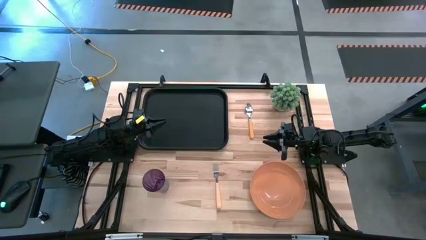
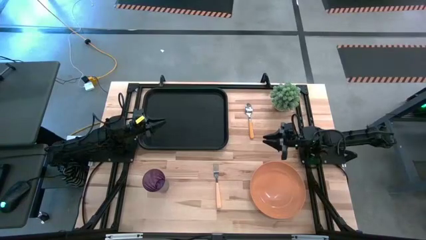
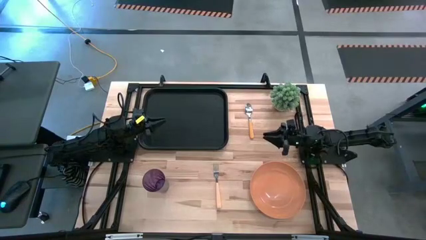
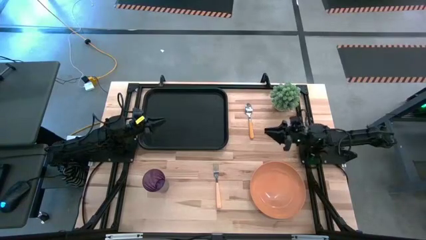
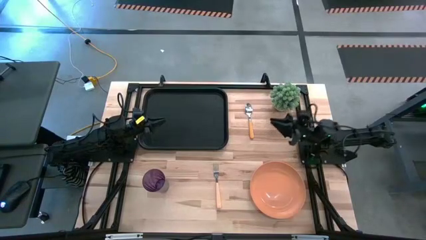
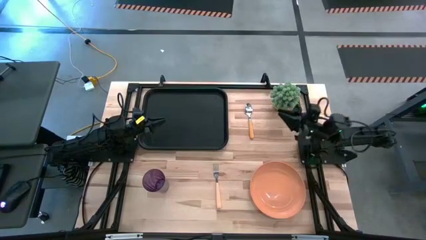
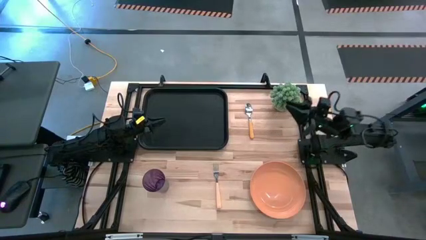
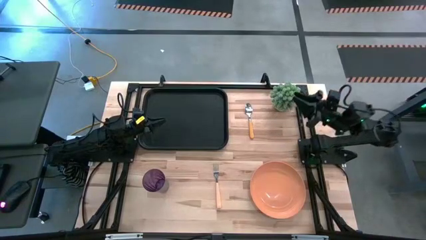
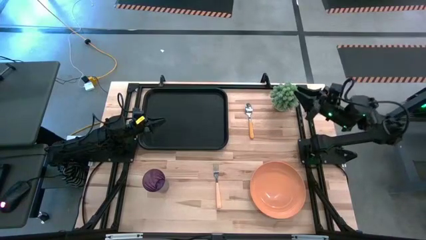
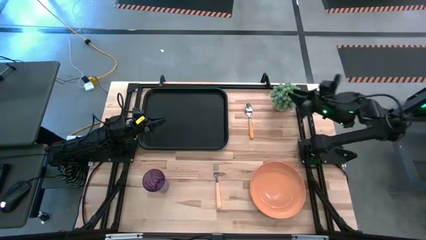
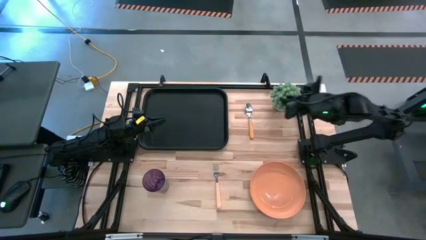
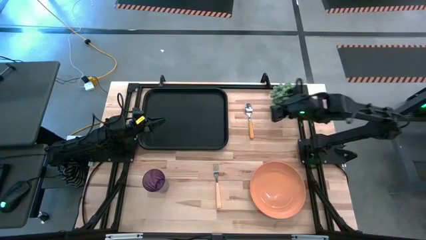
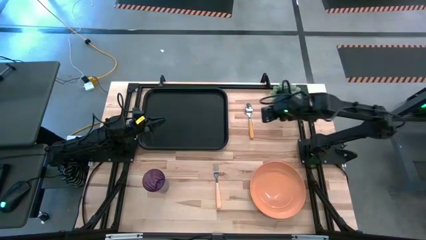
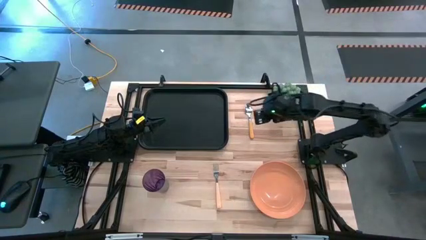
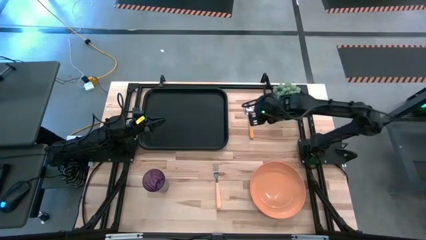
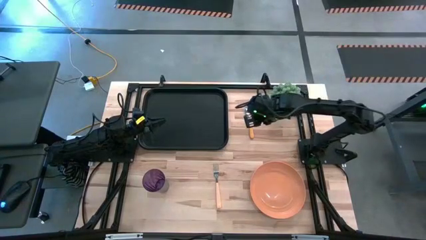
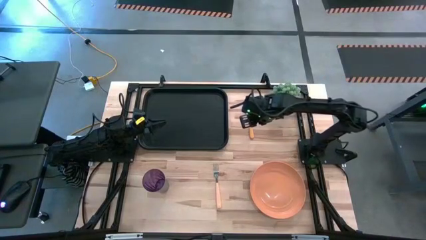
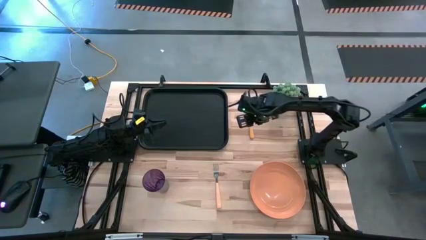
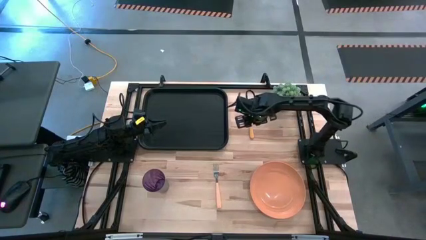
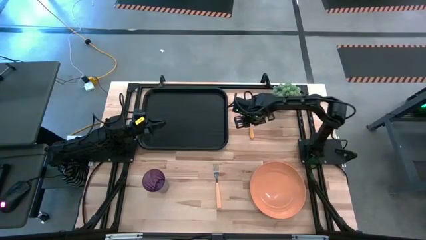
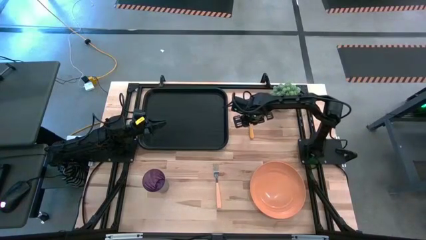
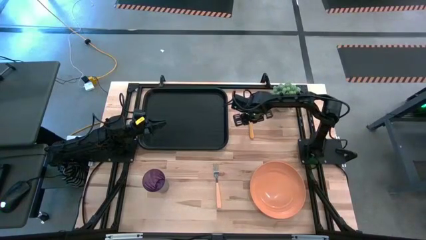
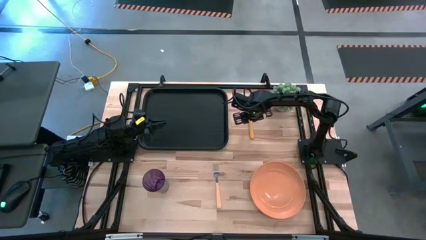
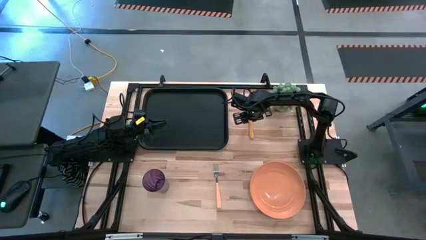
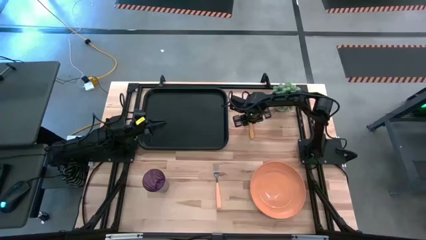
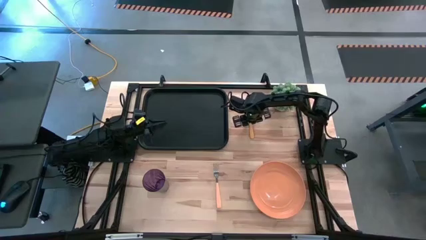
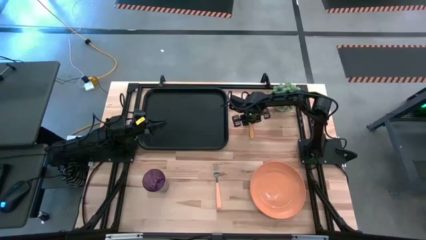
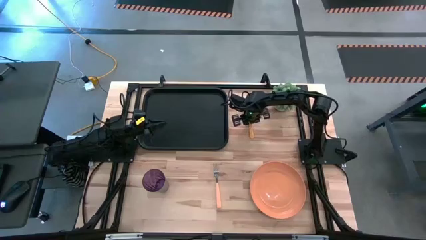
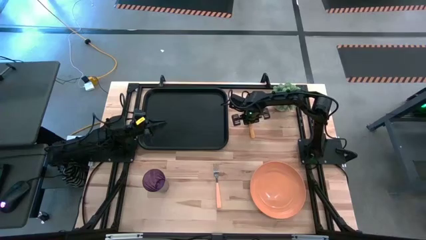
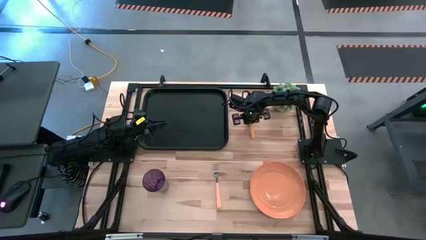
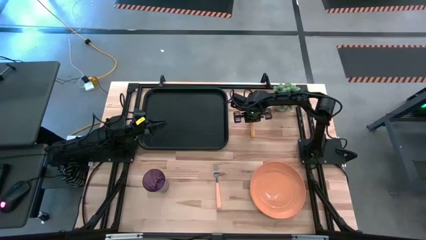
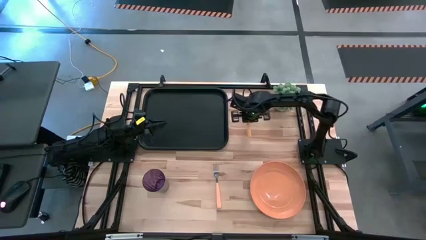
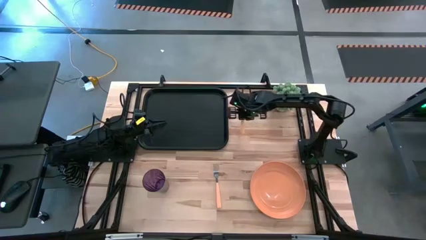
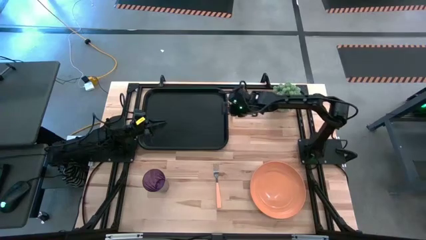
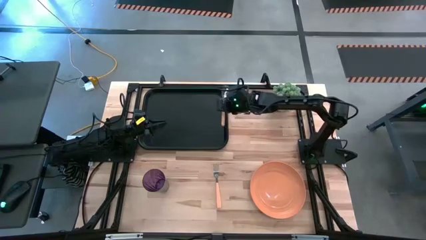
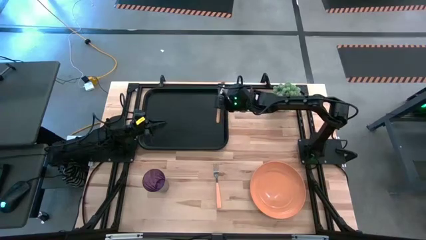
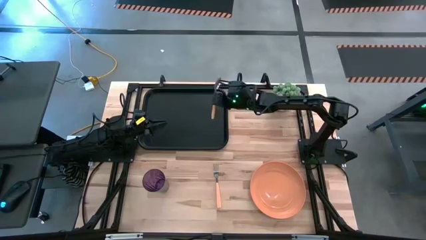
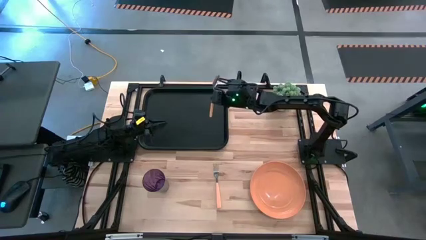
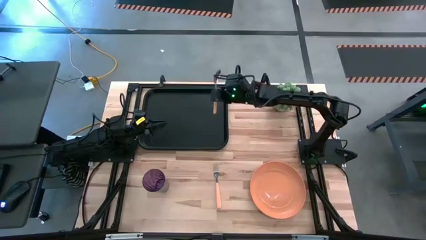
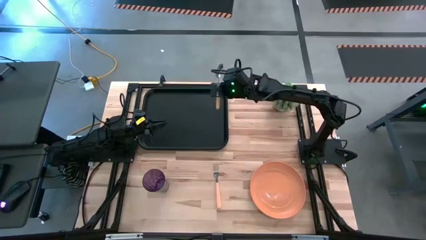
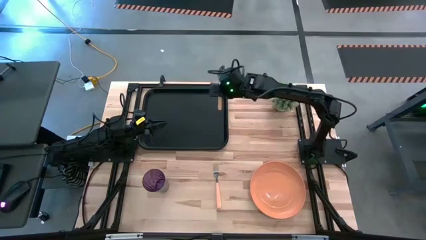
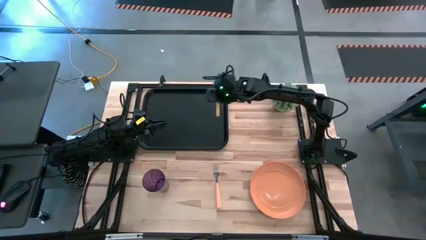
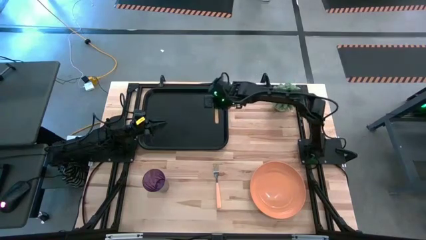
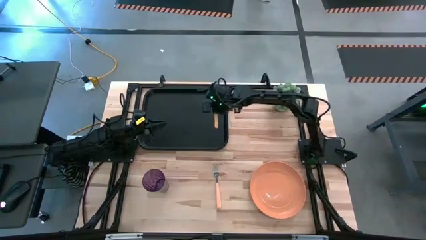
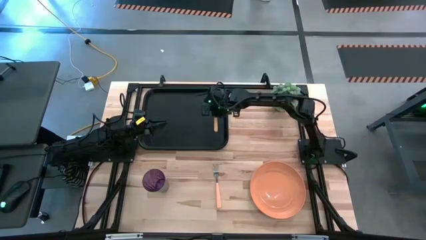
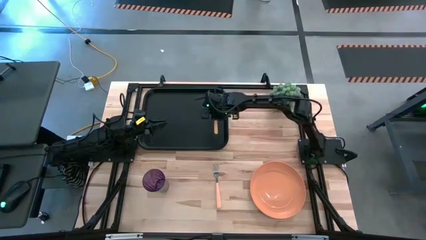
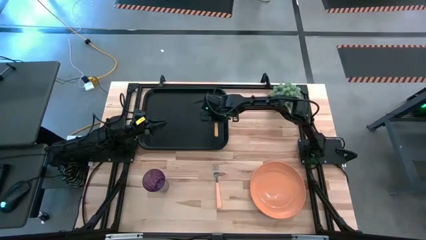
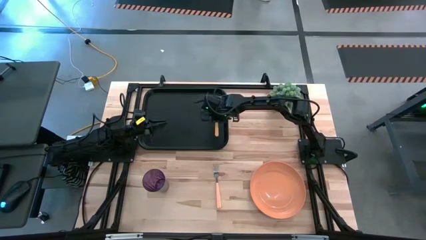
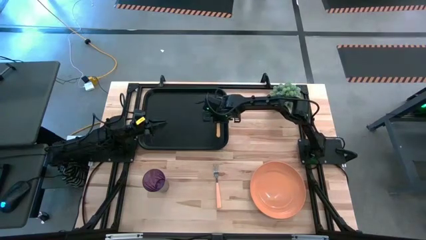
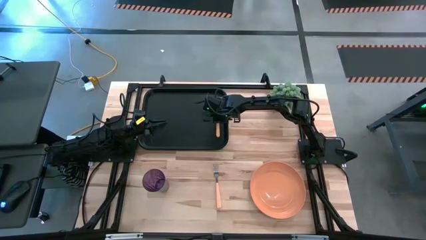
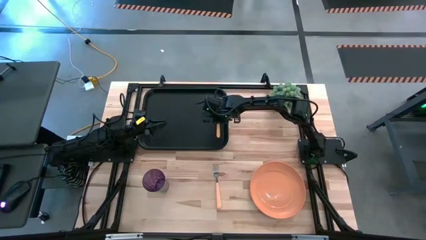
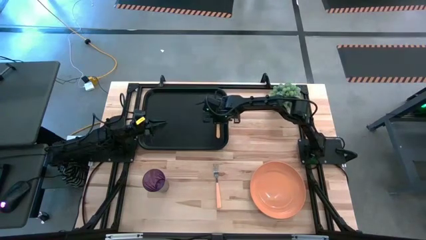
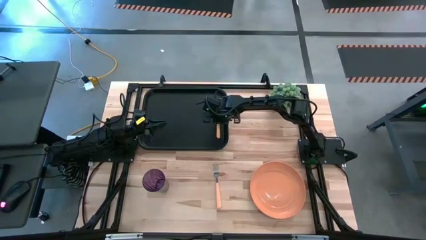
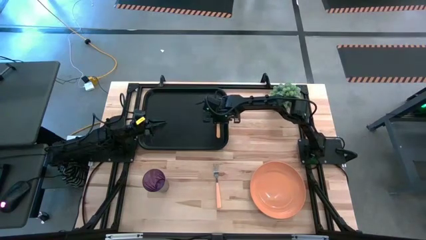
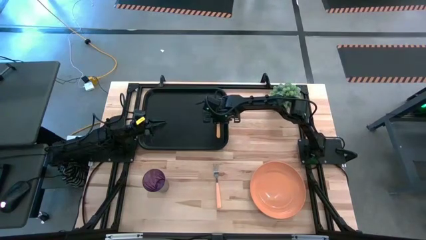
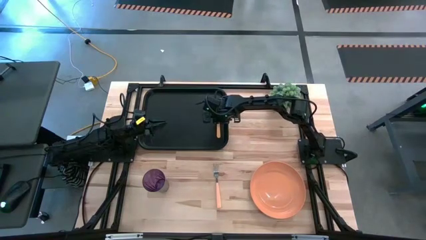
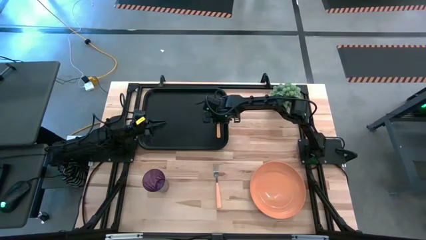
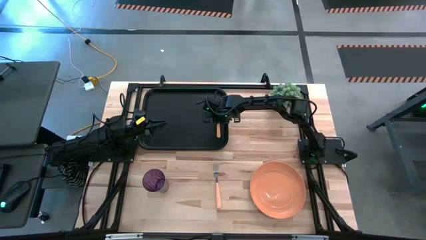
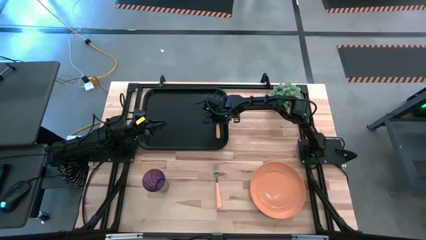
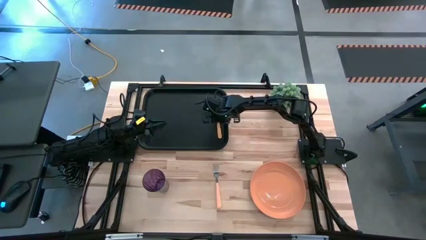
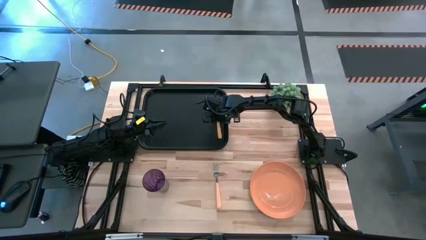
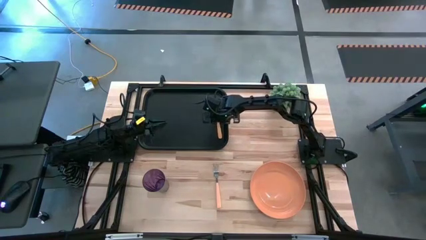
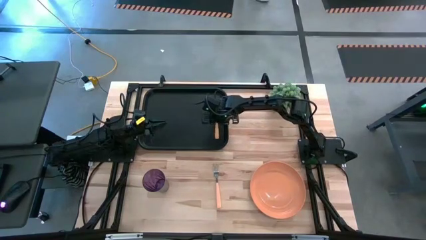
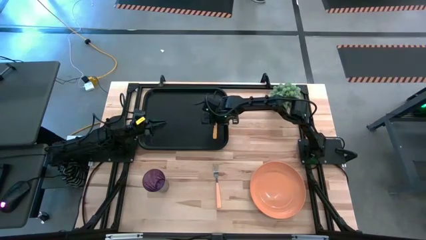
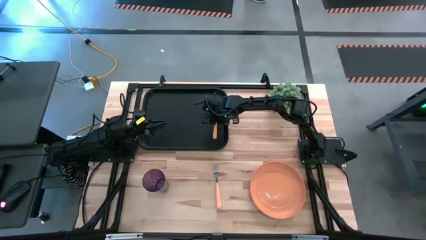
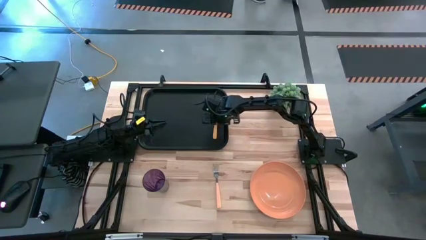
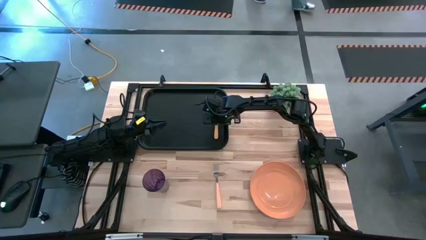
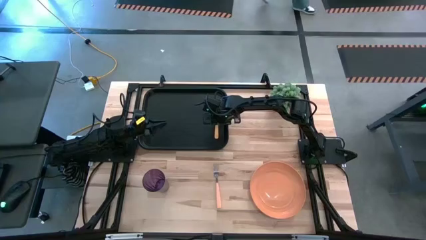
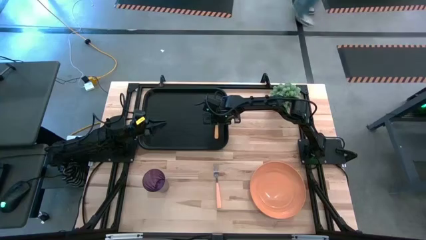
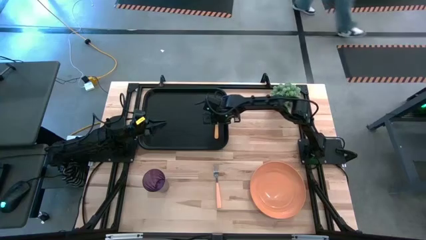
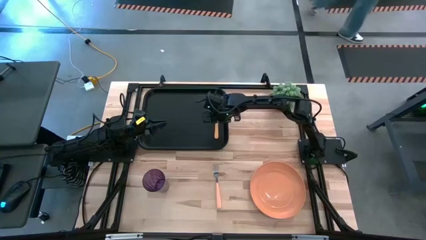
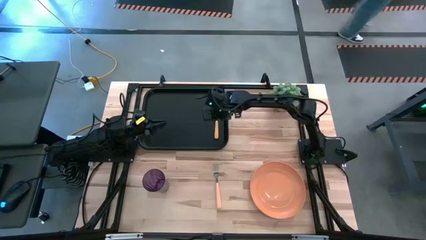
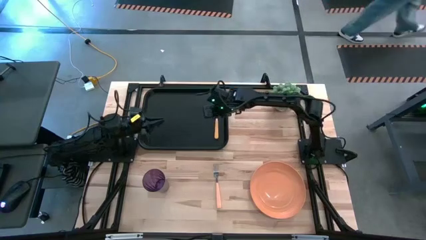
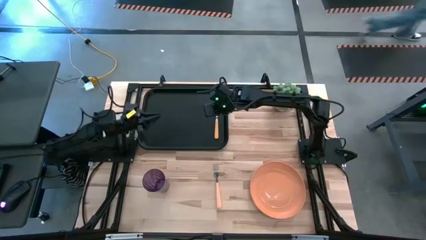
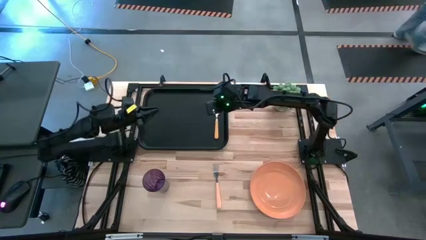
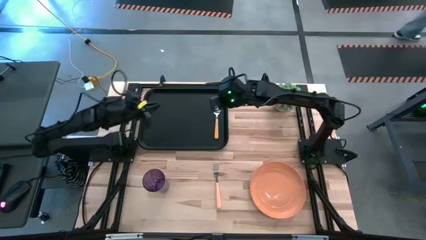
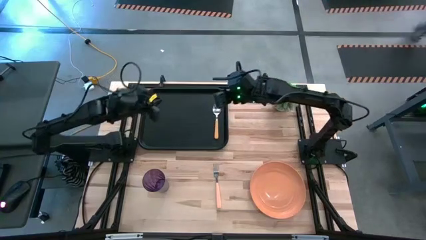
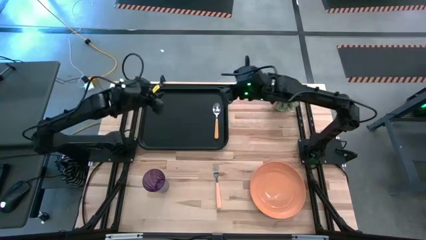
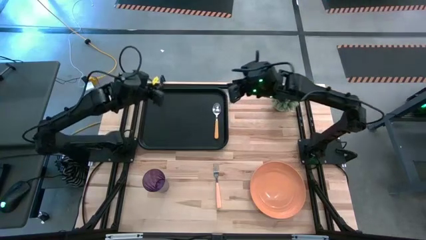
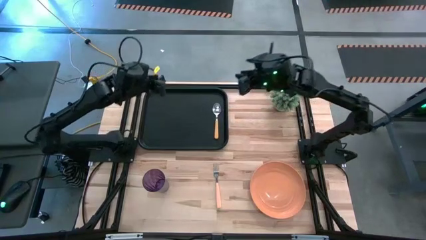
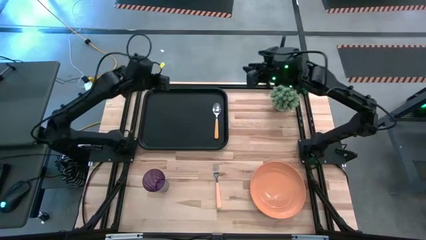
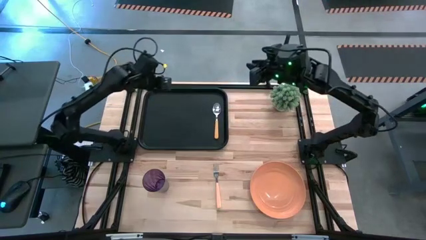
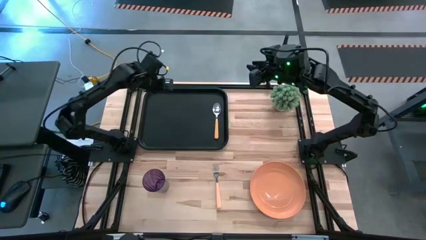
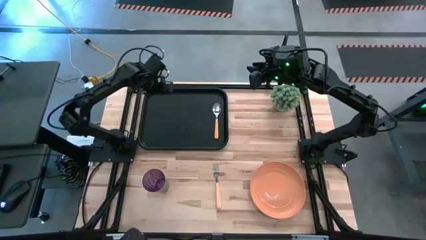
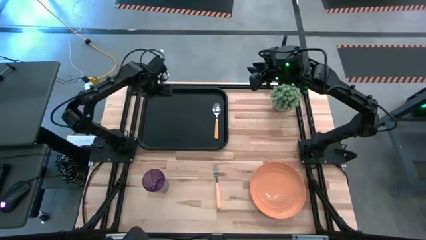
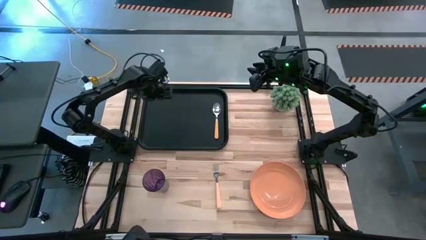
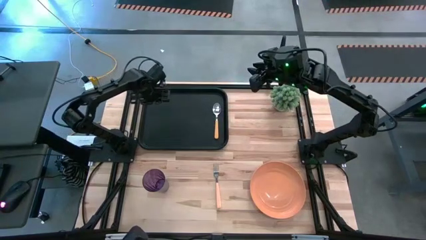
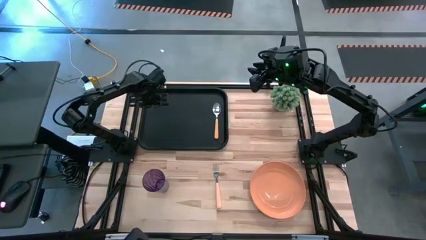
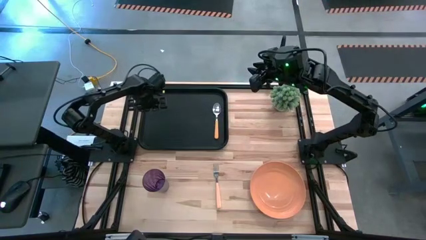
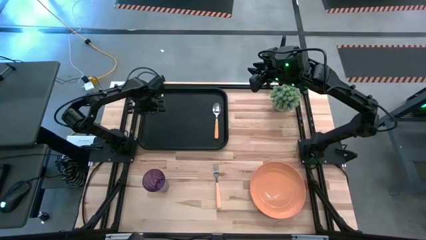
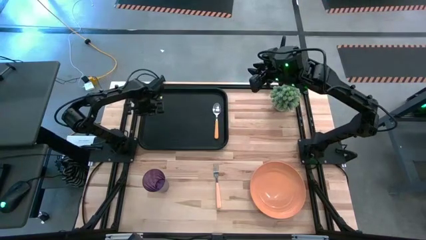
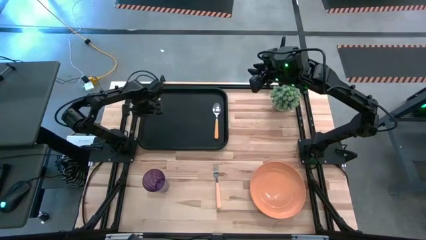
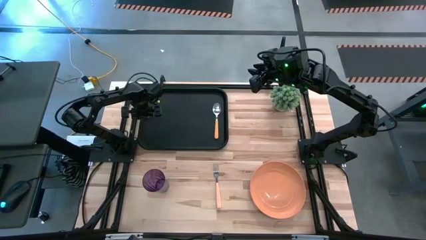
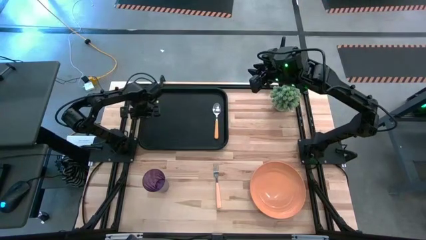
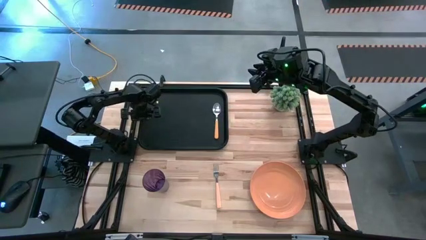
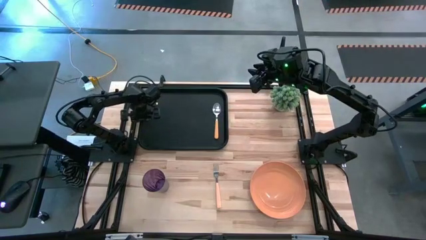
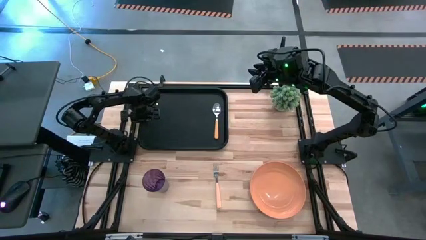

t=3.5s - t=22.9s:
Task: Pick and place plate/cup/fork/spoon on tray
Put the orange spoon on the black tray
